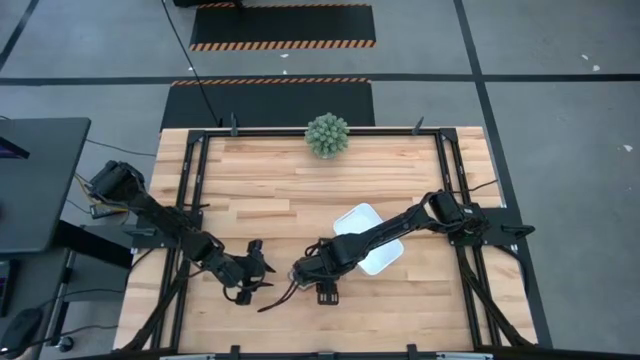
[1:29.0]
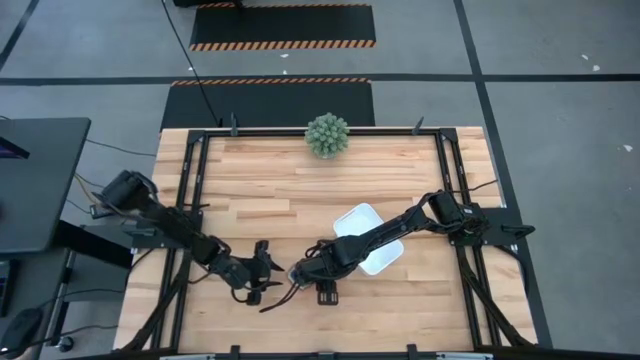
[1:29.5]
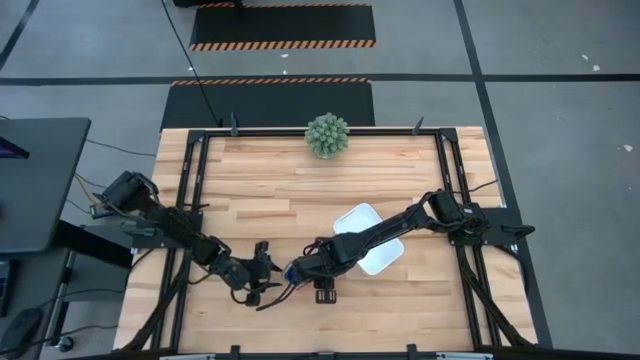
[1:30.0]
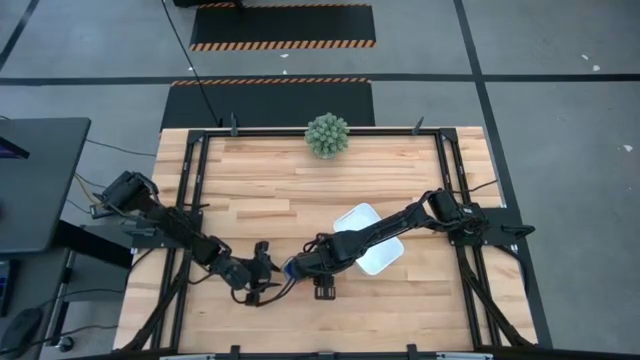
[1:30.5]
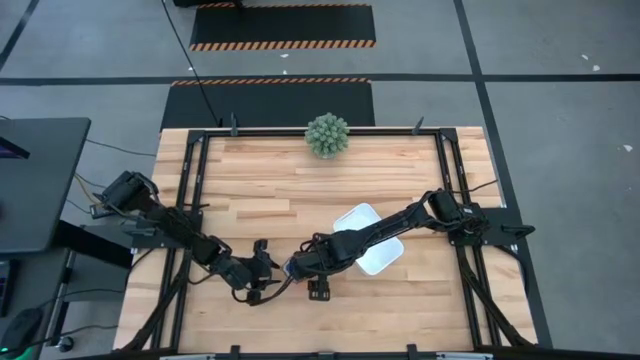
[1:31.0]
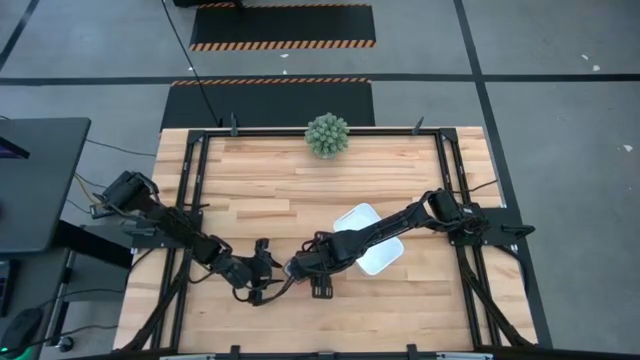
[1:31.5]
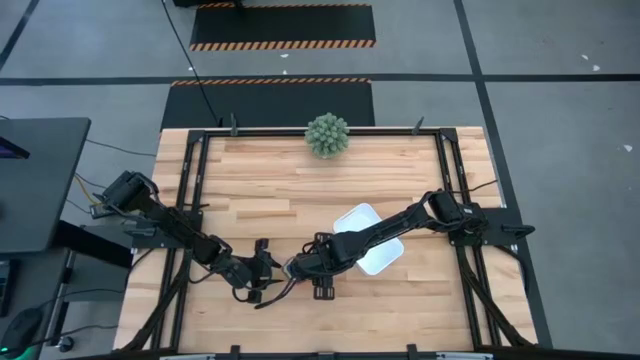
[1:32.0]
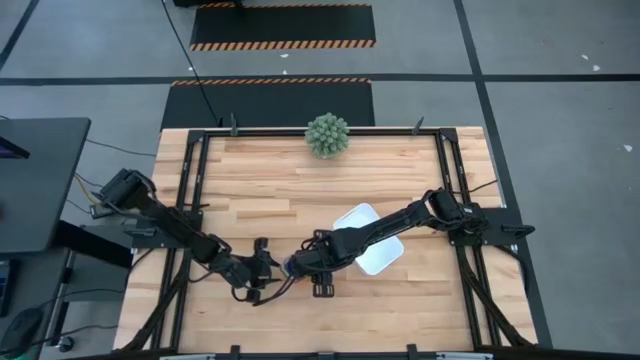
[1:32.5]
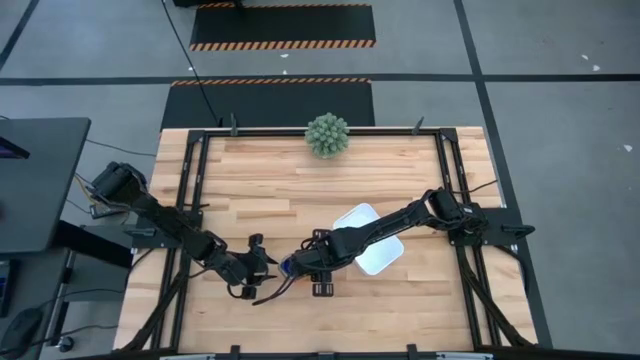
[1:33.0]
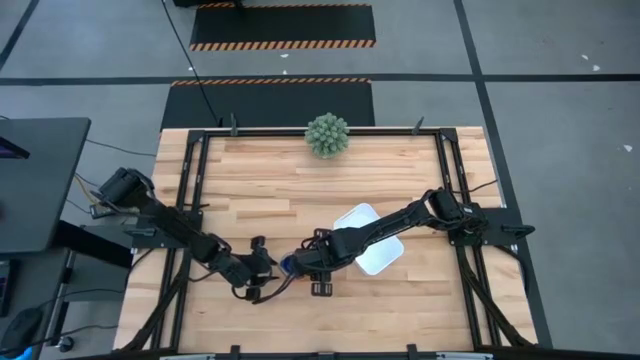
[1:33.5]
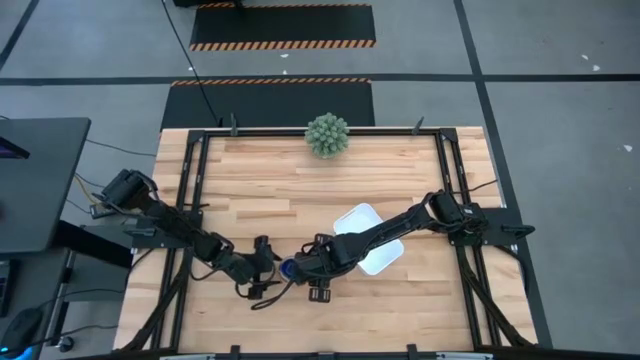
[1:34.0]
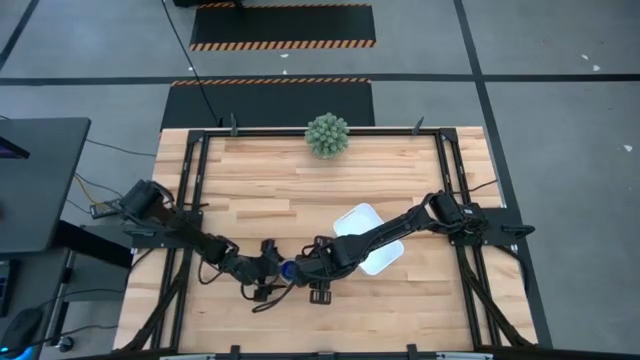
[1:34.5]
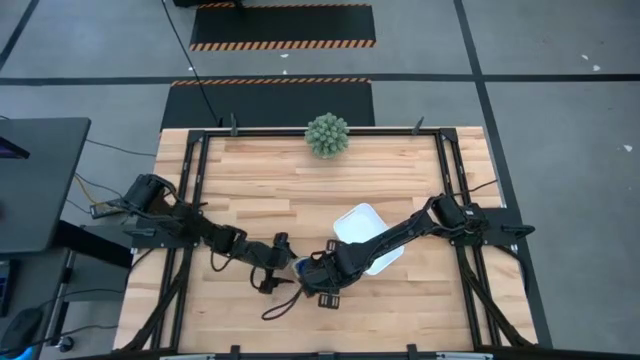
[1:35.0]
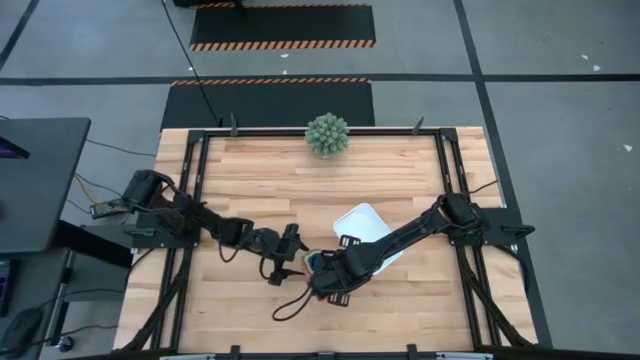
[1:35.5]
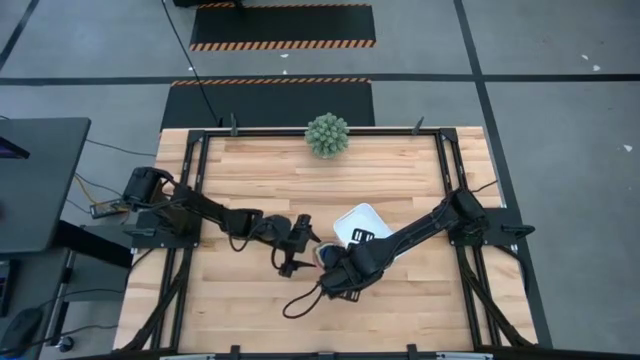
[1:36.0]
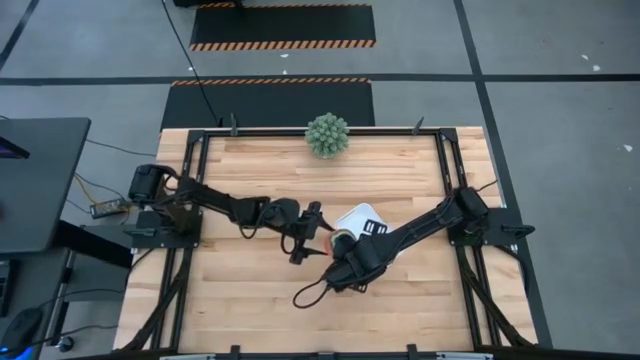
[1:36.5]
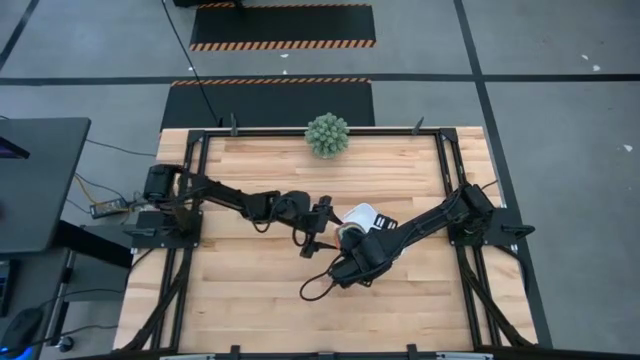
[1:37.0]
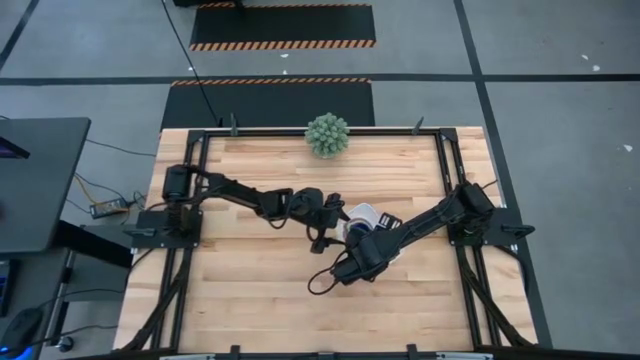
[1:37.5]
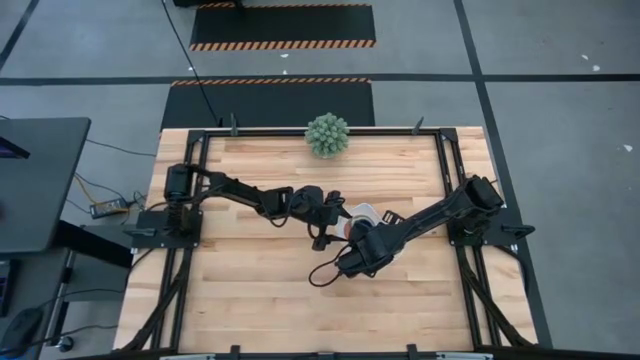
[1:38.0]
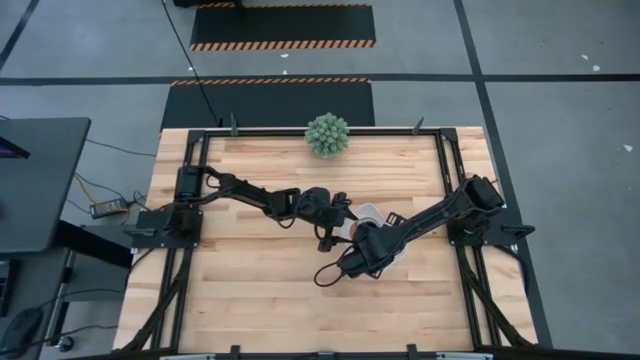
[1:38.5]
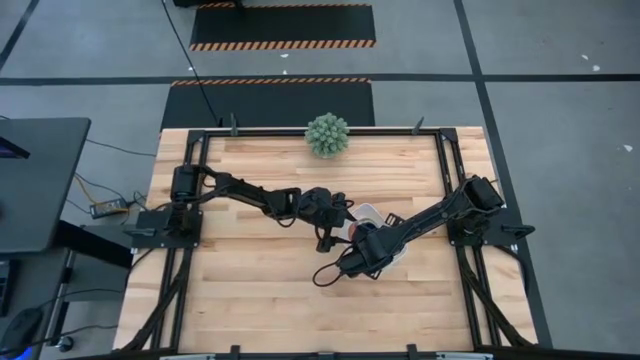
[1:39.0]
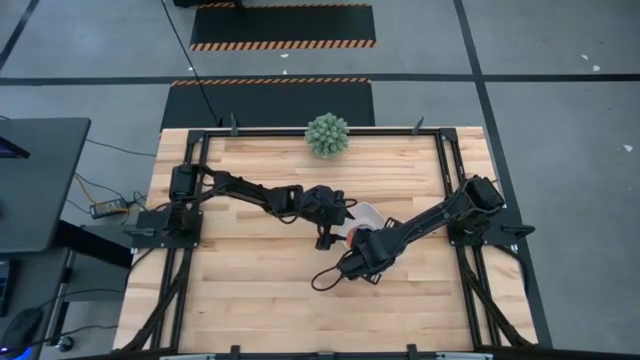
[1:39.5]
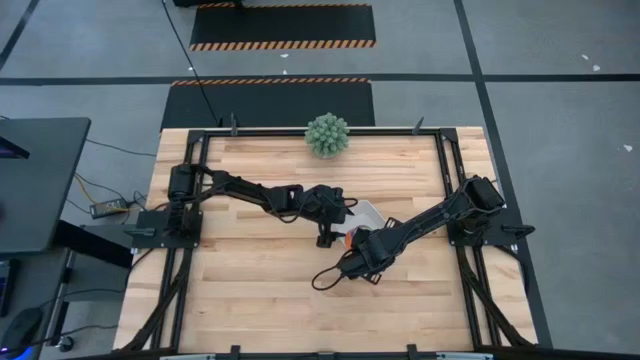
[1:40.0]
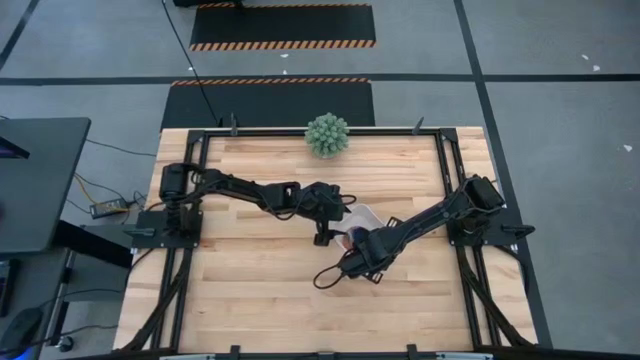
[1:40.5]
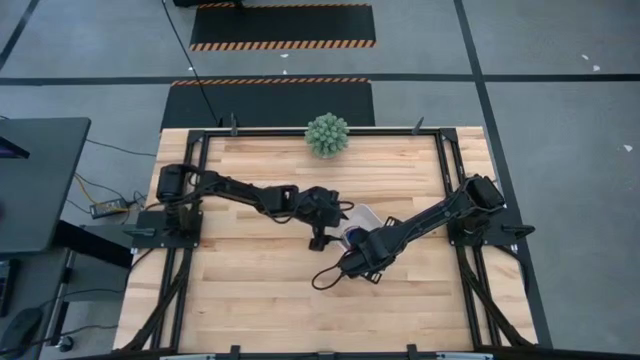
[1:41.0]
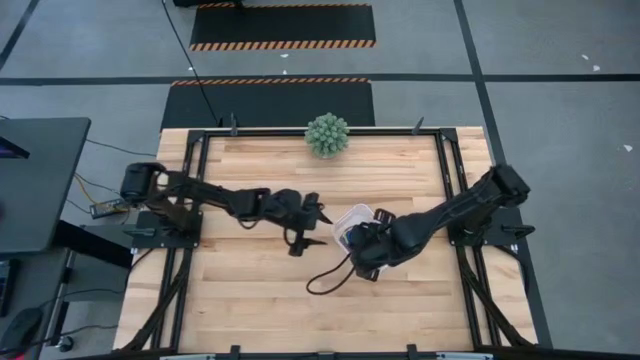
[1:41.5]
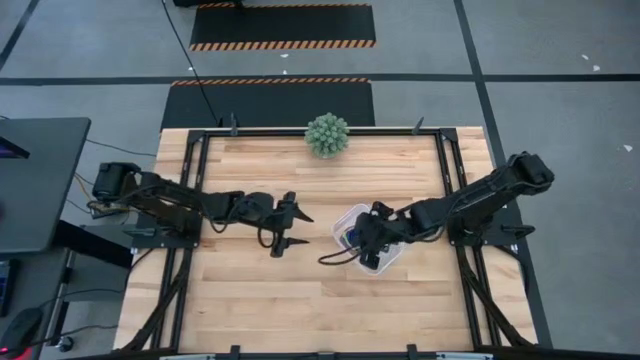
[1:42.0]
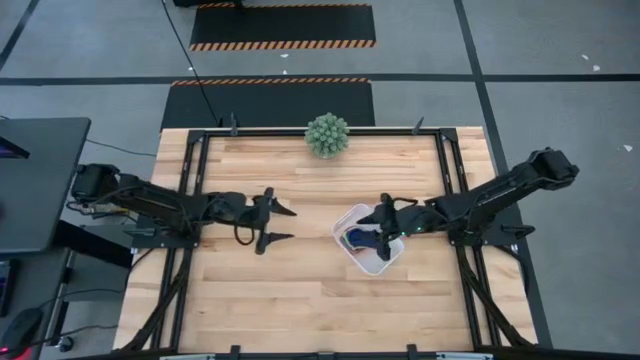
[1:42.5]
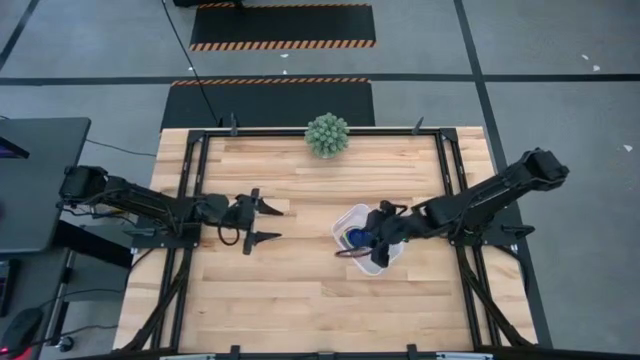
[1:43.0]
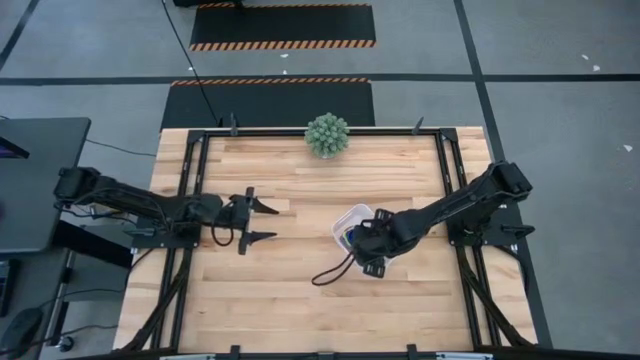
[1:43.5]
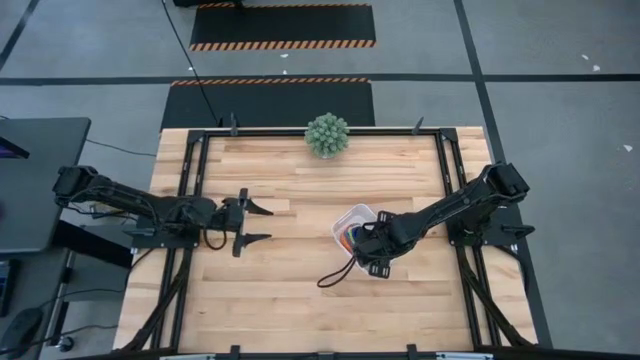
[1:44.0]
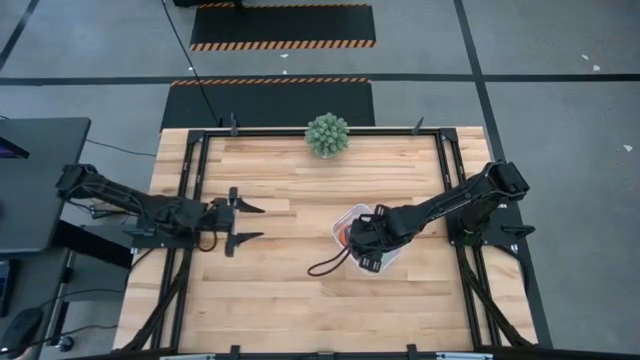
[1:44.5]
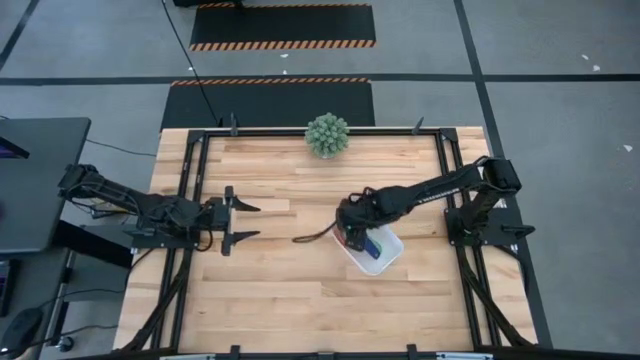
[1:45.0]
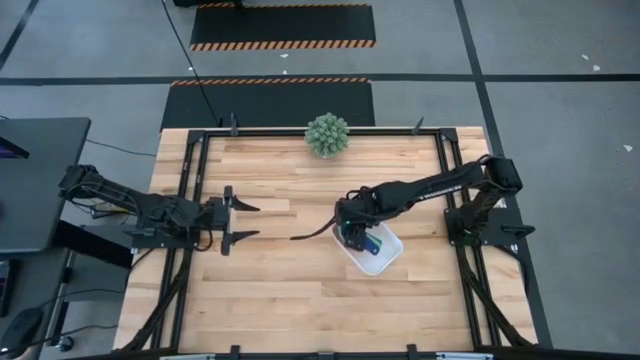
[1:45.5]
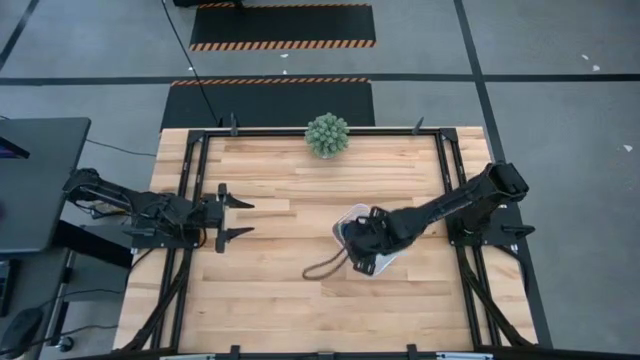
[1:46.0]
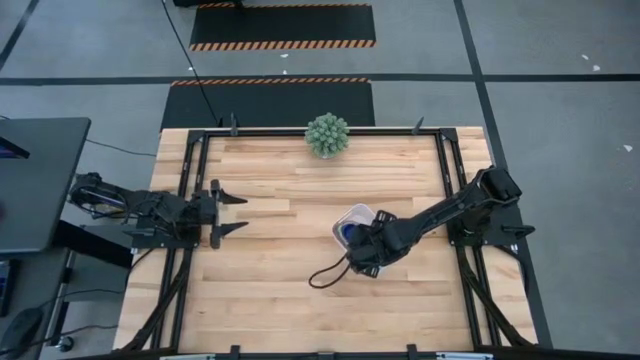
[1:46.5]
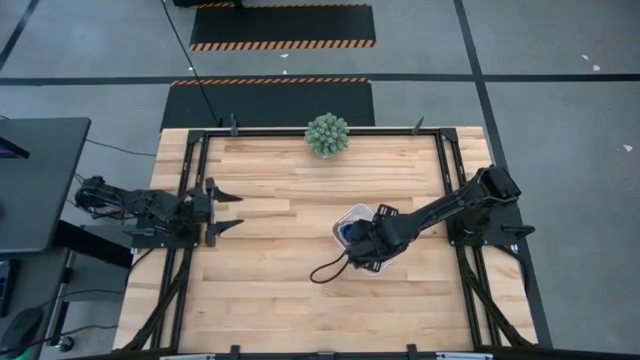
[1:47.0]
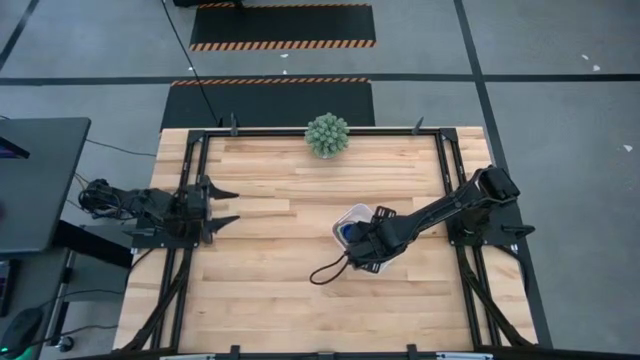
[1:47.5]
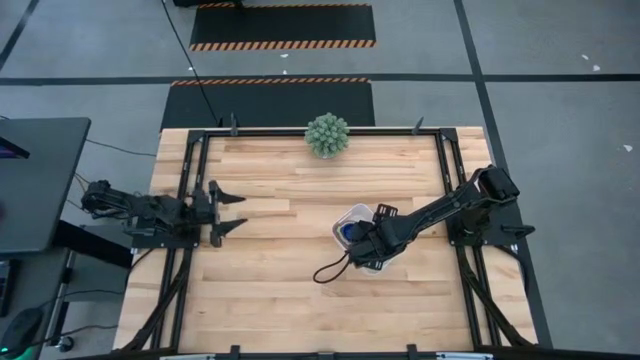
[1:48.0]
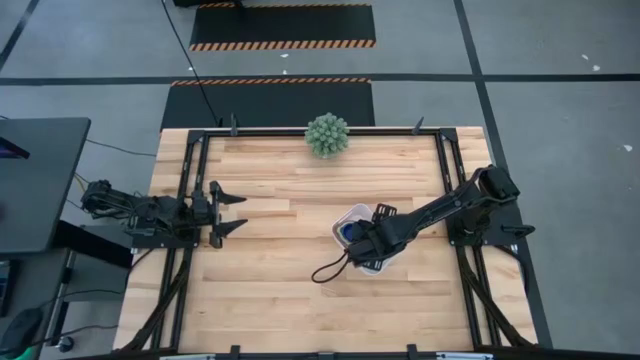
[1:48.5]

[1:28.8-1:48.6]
Task: Nest measuring cups in basket
Put the stacked measuring cups into the white bin

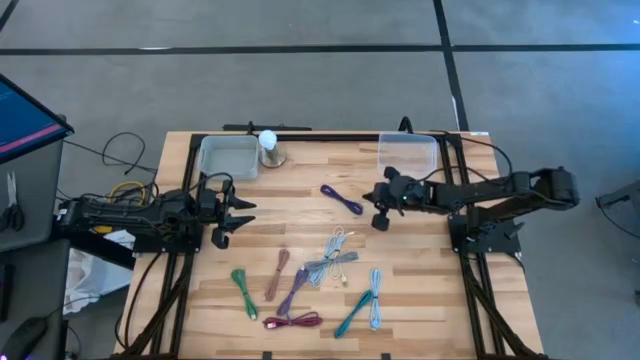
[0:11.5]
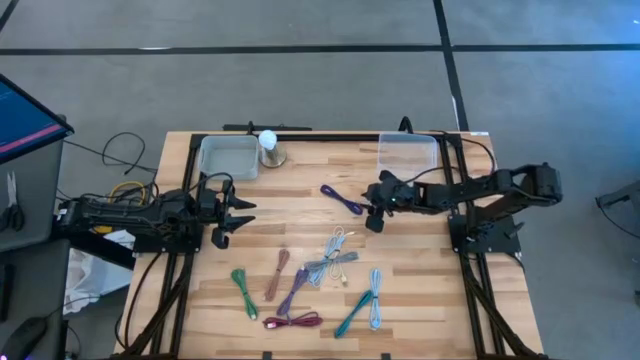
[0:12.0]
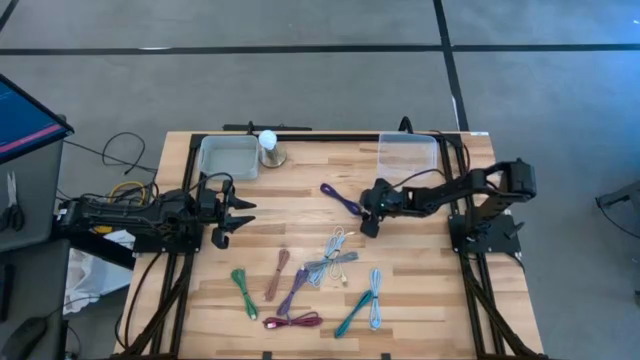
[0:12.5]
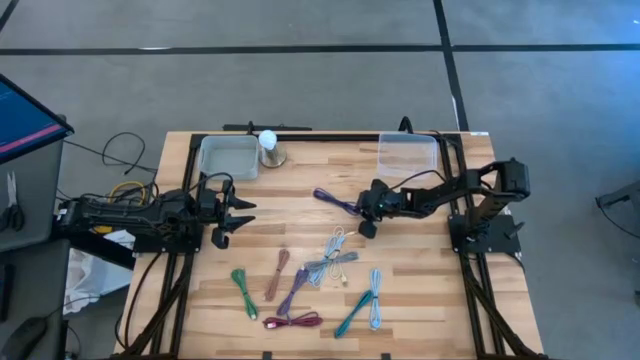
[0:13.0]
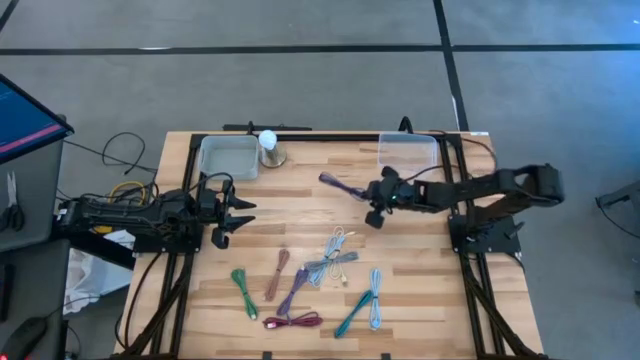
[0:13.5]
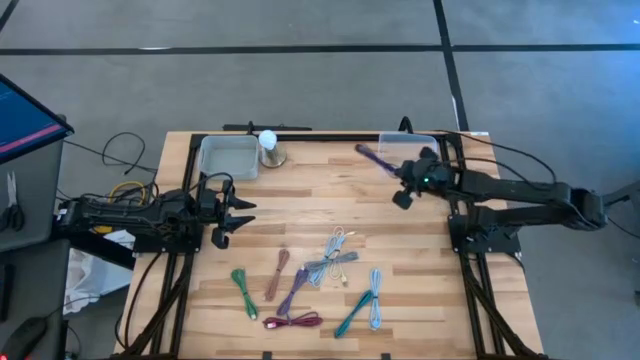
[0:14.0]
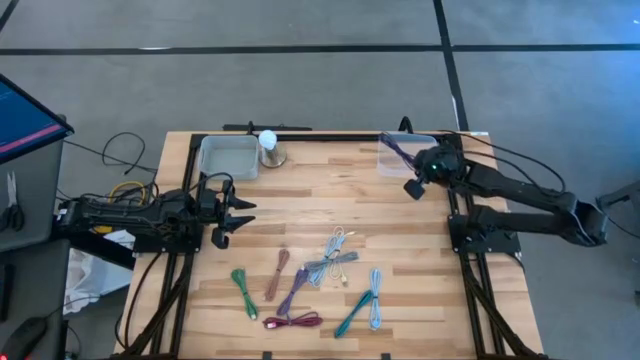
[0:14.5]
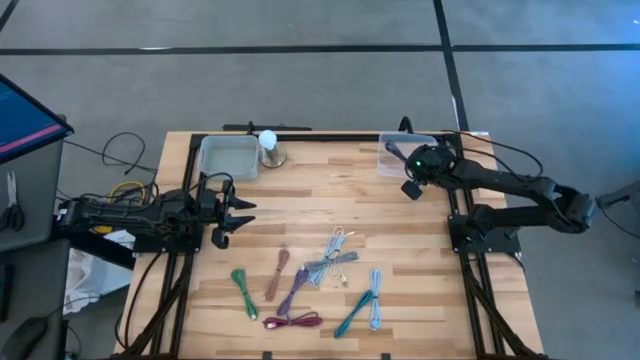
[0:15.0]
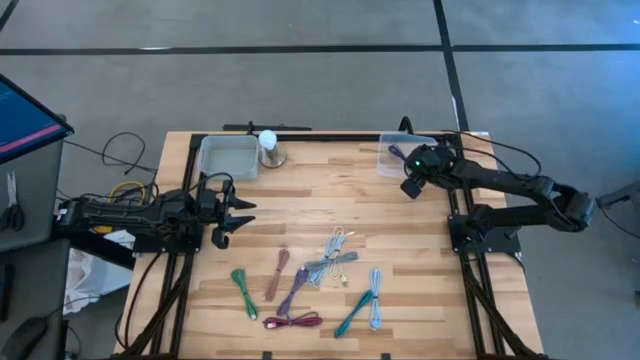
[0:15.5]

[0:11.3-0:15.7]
Task: Pick & Place USB Port
Put the dark blue patterned charger cable into the transparent bin
